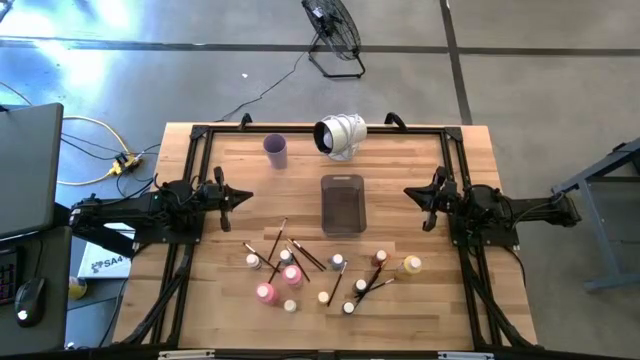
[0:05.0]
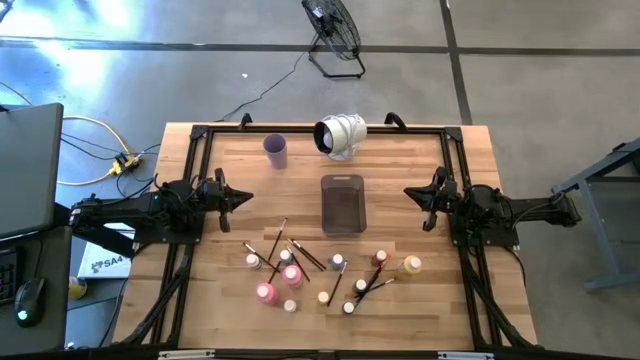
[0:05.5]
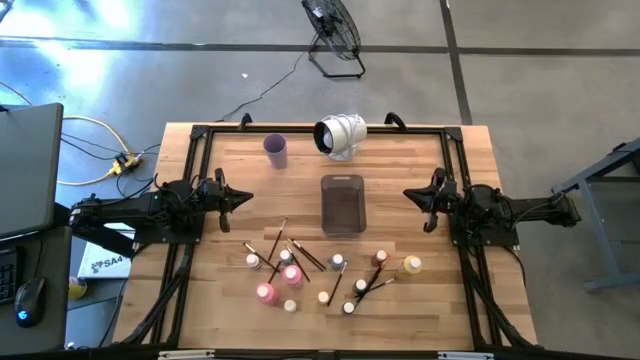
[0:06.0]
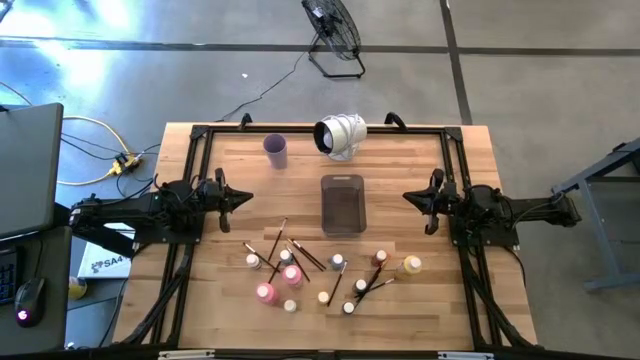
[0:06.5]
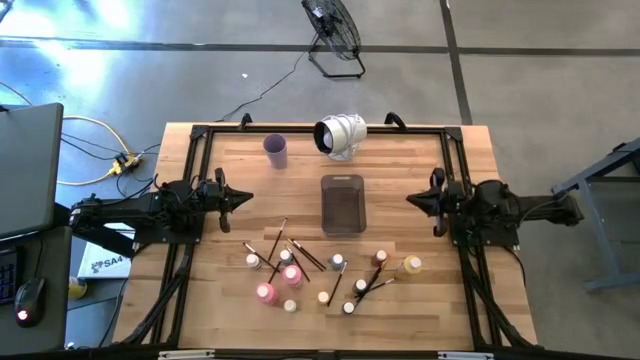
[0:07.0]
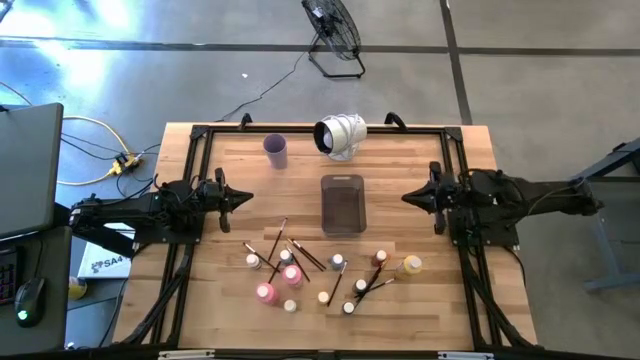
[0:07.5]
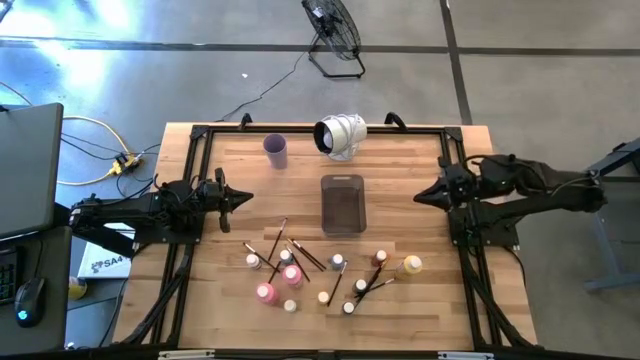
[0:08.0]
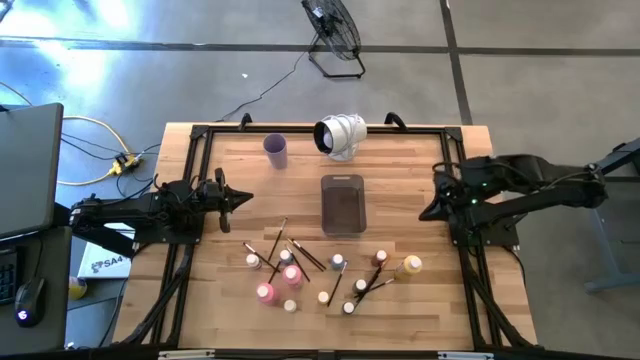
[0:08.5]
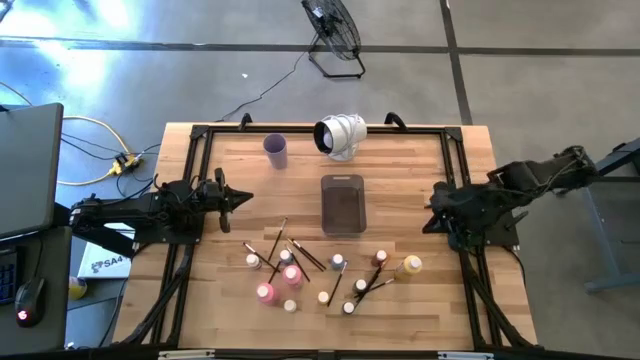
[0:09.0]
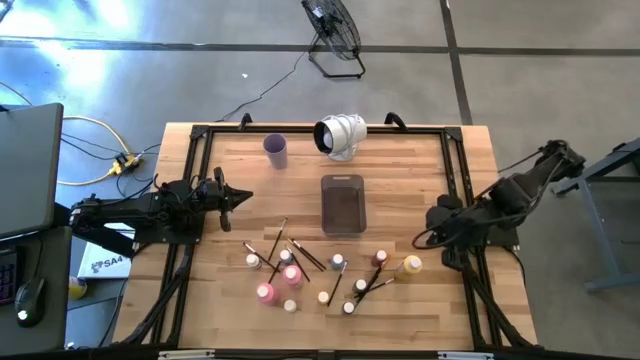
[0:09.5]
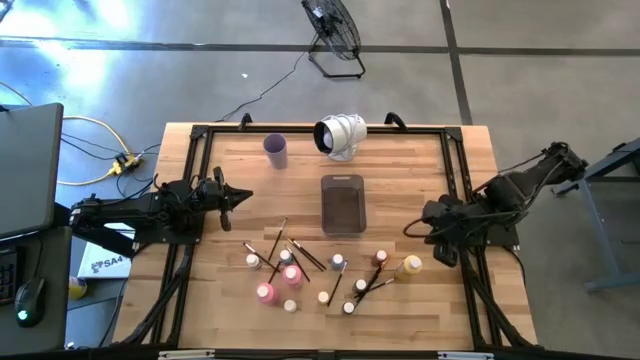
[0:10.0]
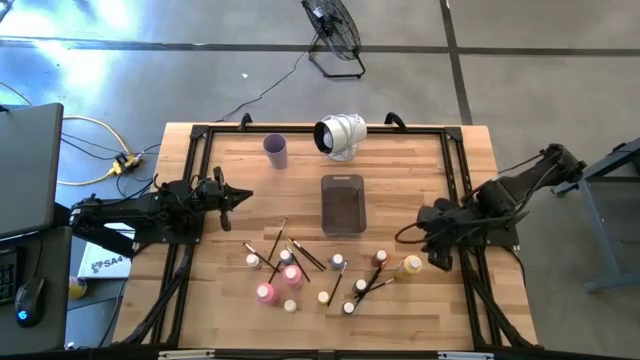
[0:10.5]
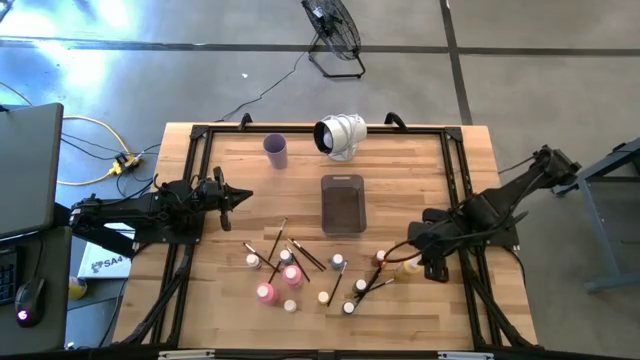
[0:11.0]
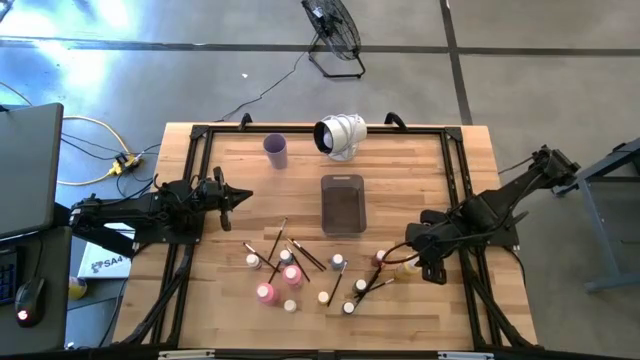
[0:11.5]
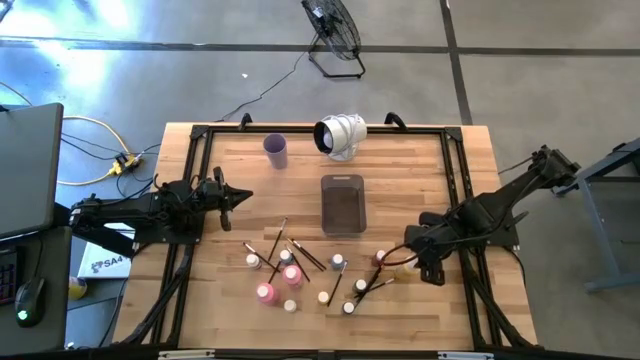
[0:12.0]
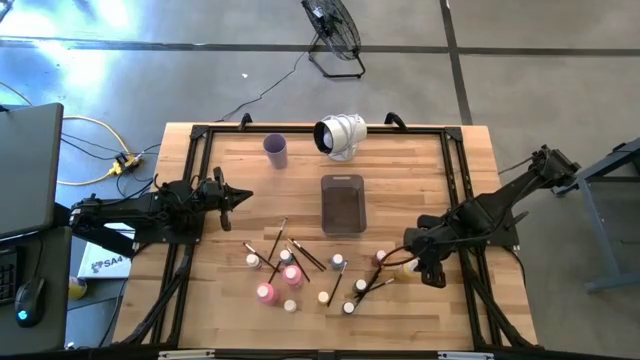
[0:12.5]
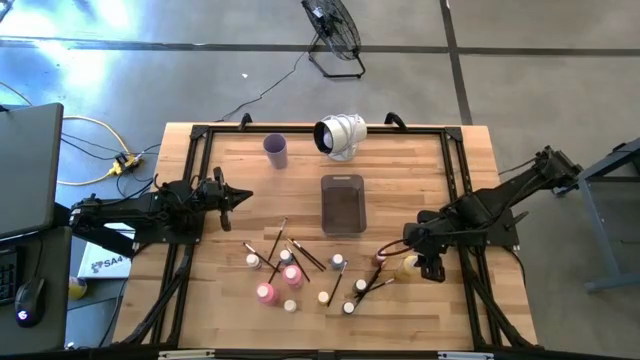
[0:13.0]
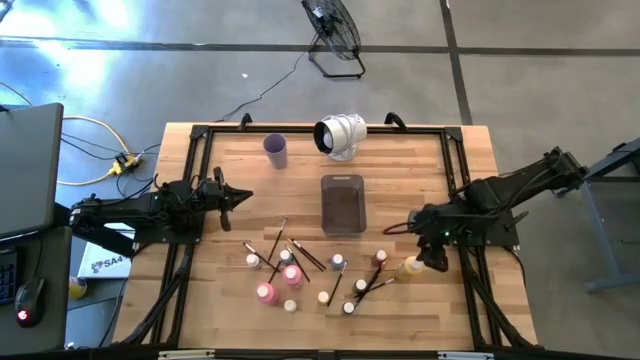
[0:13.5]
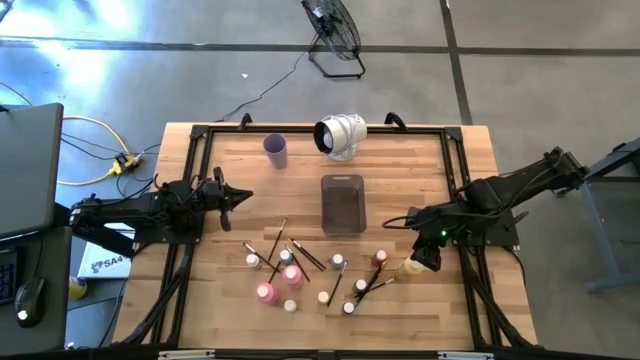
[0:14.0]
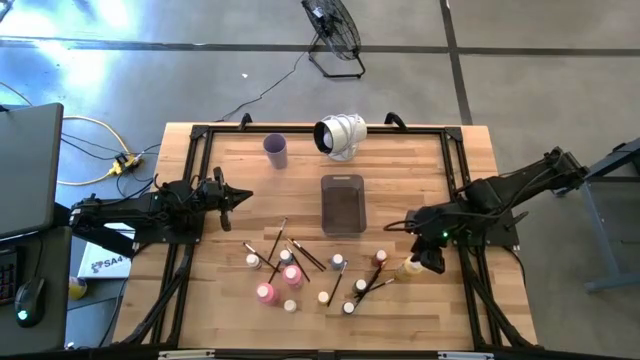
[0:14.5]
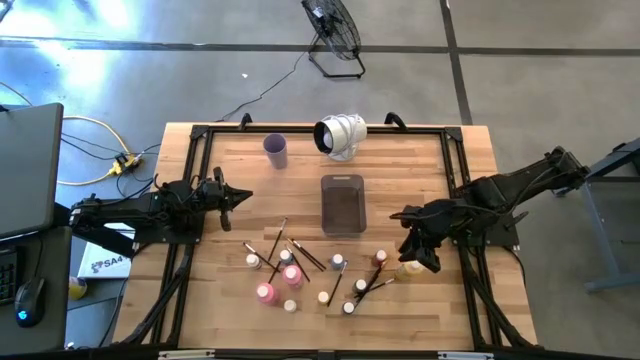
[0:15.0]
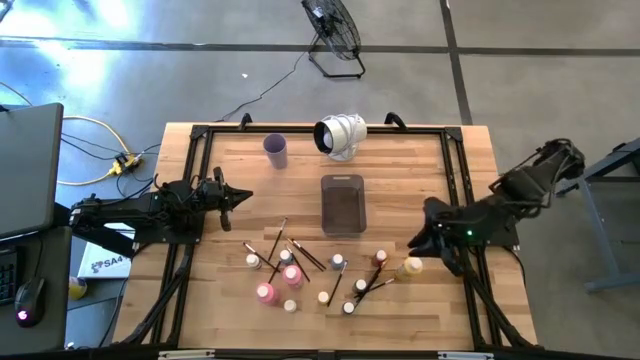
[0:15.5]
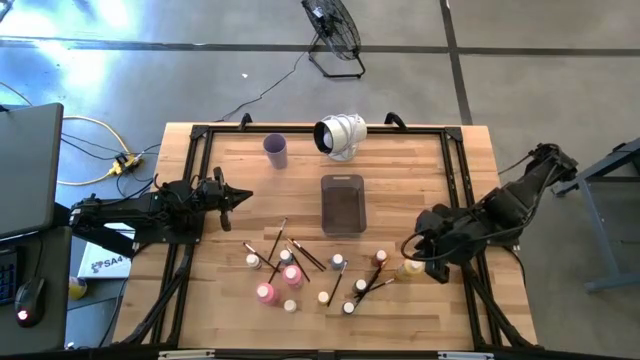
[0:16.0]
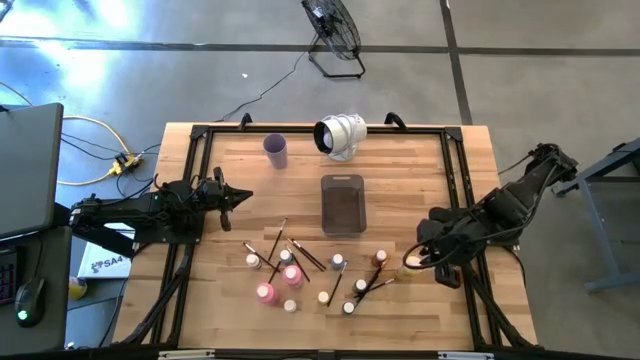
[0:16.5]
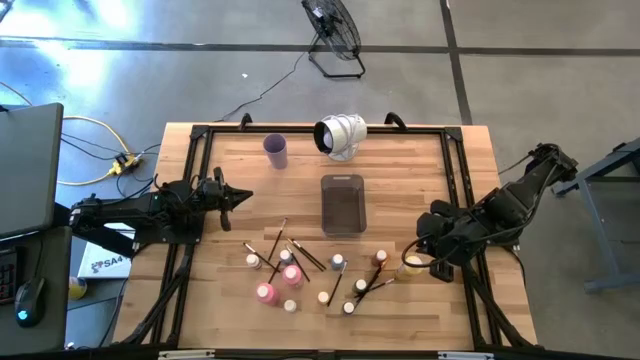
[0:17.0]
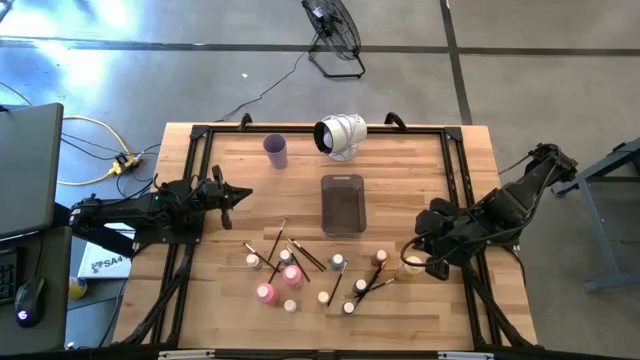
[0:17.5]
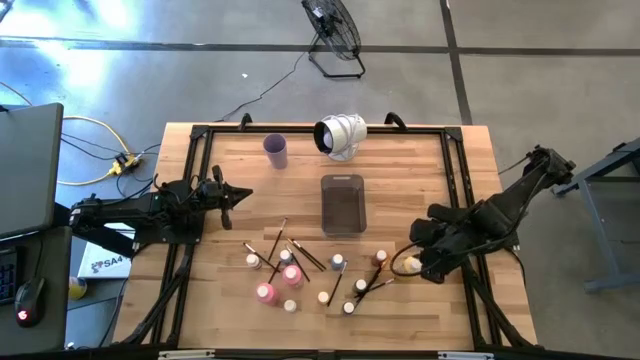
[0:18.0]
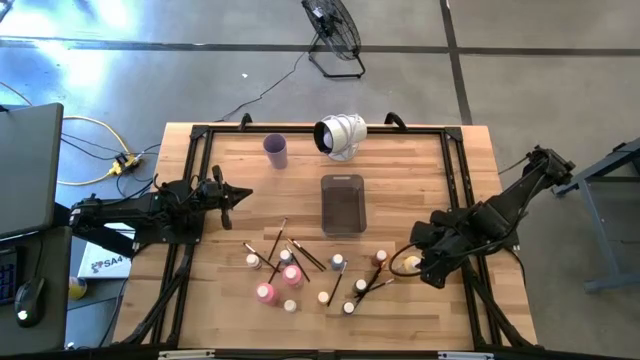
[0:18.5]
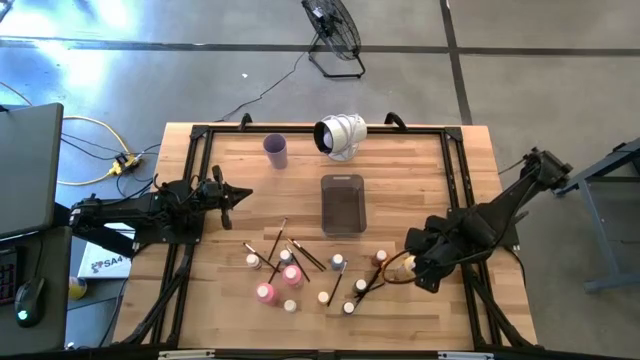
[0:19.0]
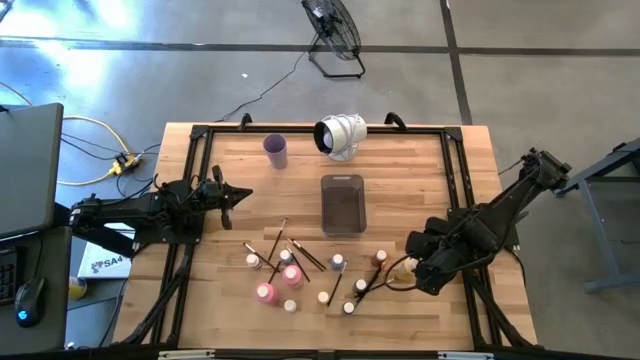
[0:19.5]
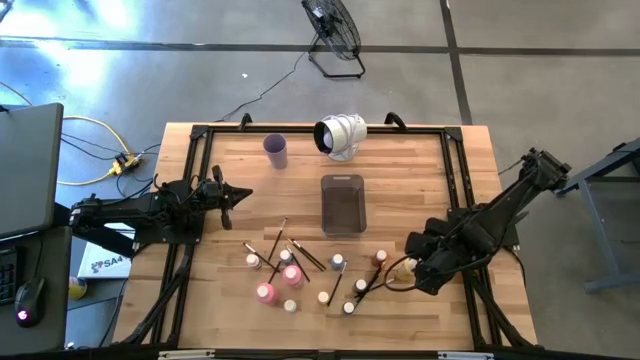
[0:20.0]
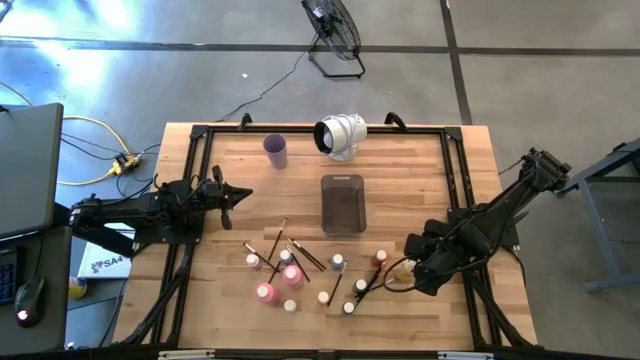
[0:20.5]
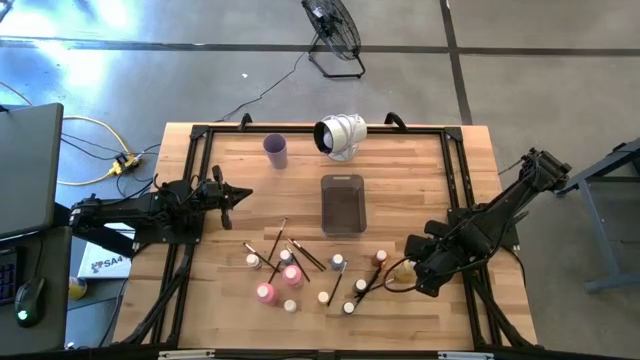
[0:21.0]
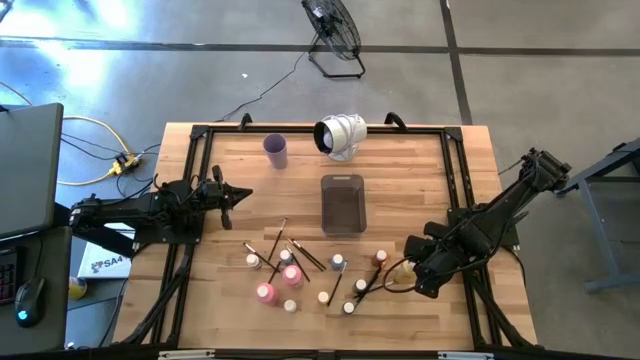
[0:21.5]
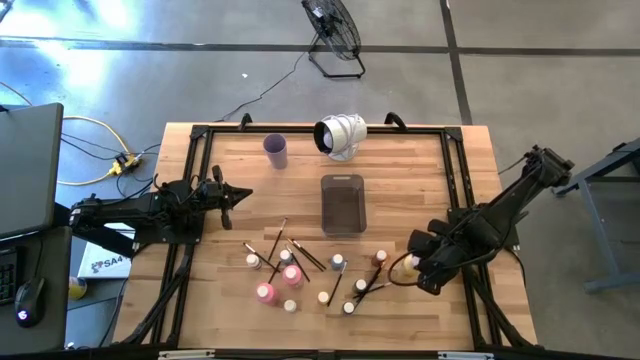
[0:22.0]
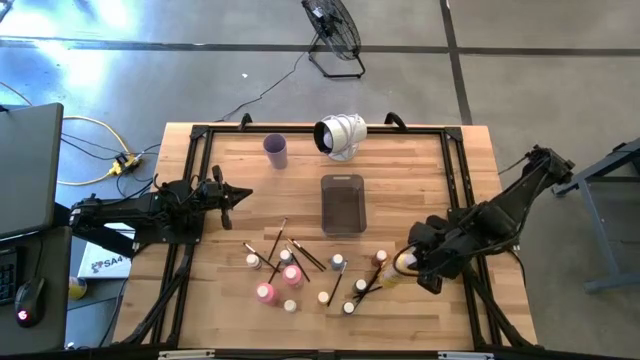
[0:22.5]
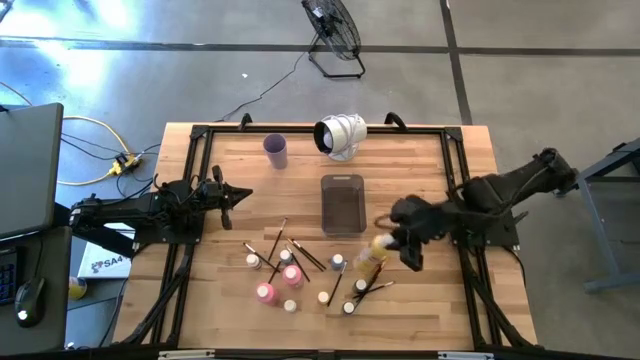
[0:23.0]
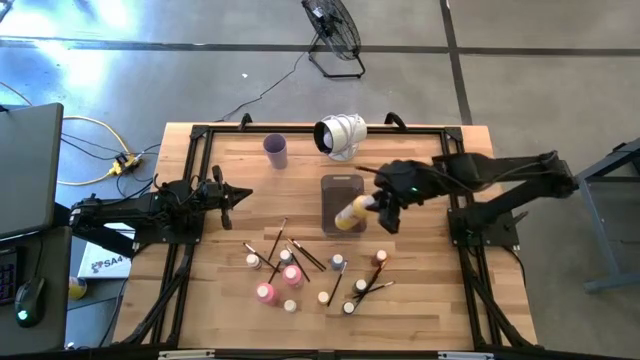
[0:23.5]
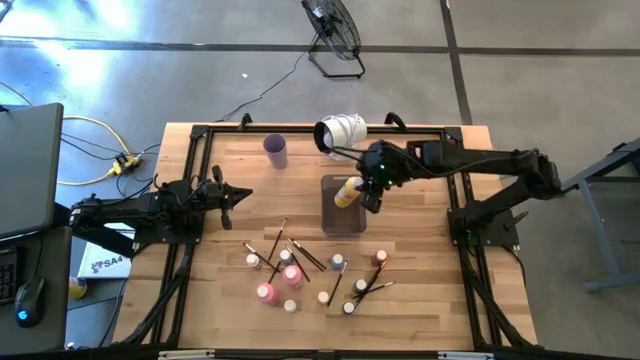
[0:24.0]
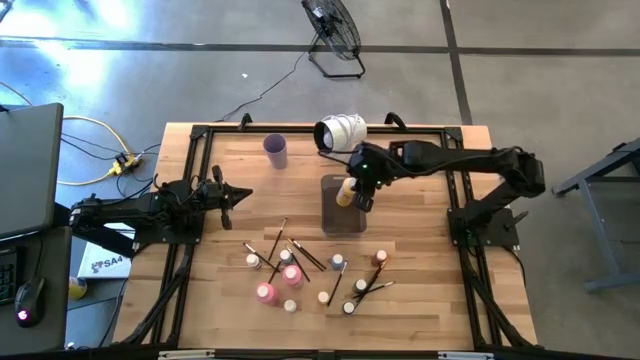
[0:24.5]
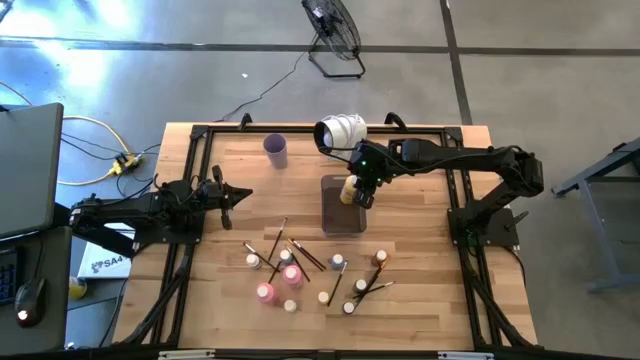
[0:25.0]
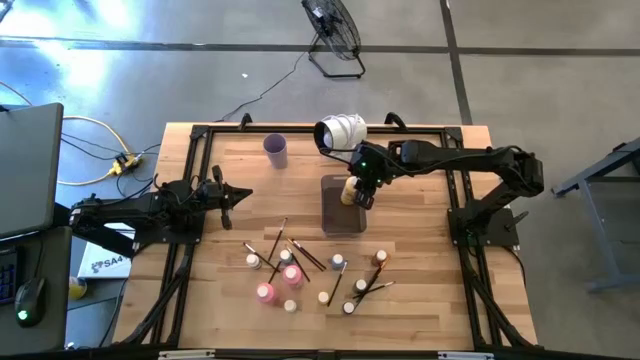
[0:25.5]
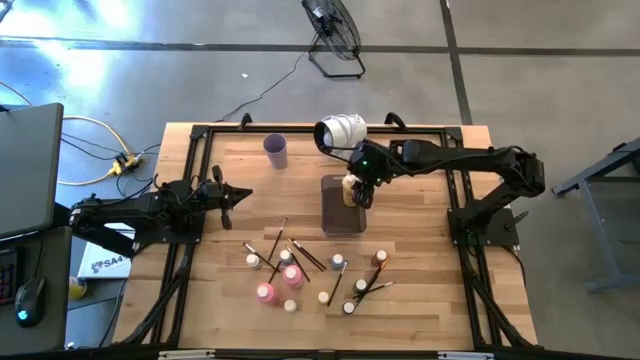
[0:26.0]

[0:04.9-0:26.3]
Task: Pick & Place Paint Supplies
Put the yellow paint bottle into the black bin
